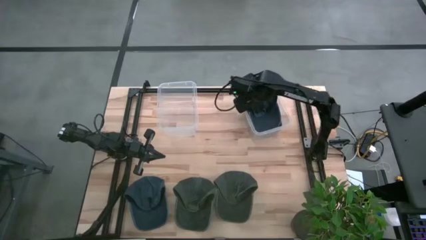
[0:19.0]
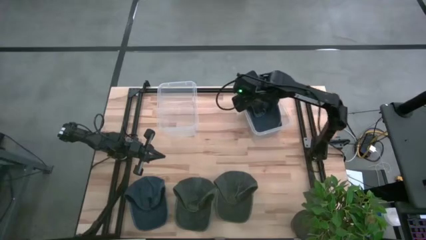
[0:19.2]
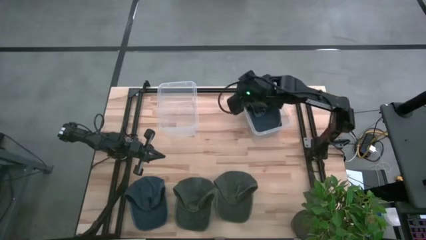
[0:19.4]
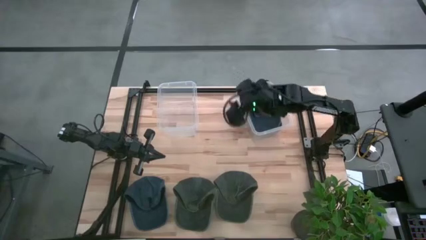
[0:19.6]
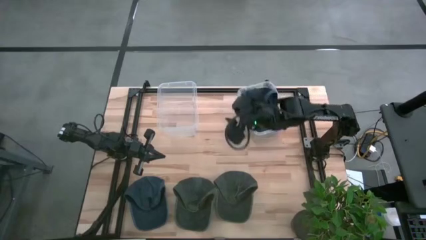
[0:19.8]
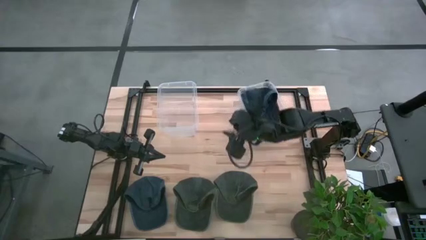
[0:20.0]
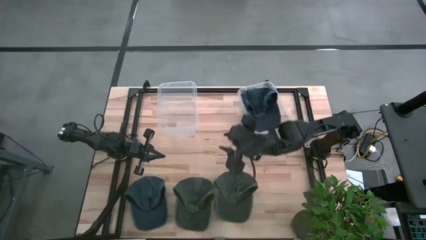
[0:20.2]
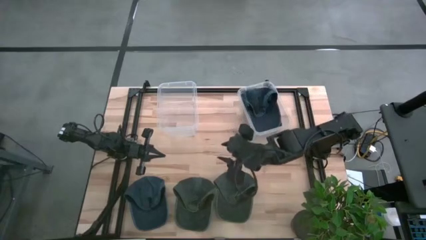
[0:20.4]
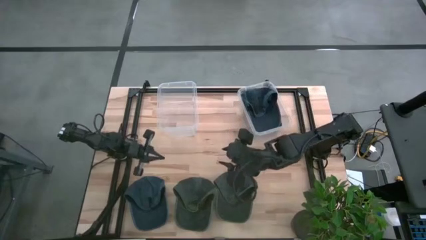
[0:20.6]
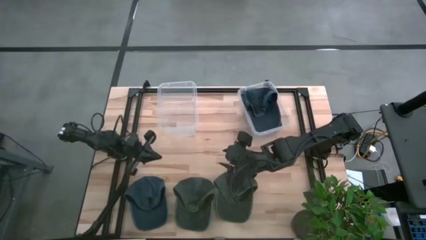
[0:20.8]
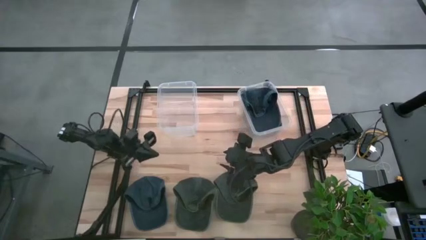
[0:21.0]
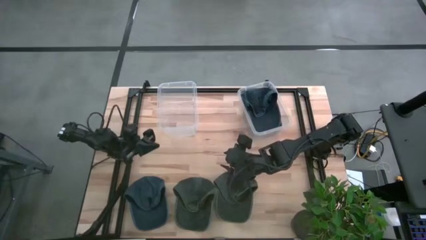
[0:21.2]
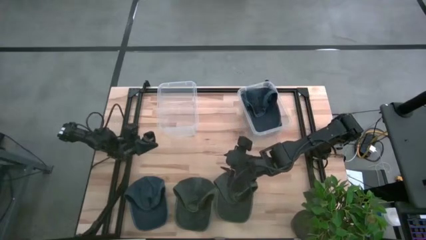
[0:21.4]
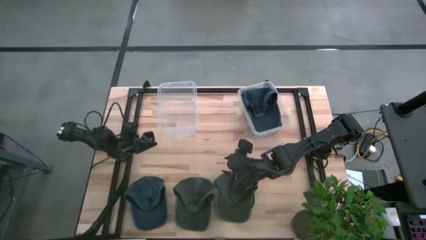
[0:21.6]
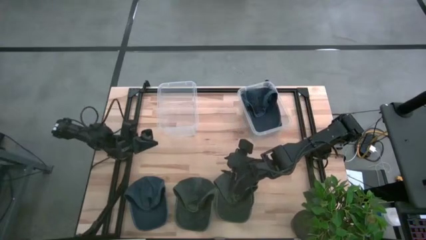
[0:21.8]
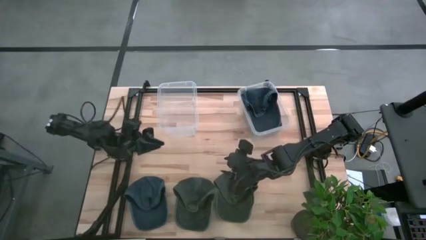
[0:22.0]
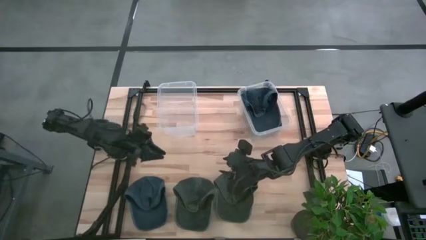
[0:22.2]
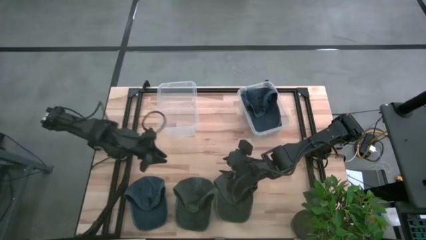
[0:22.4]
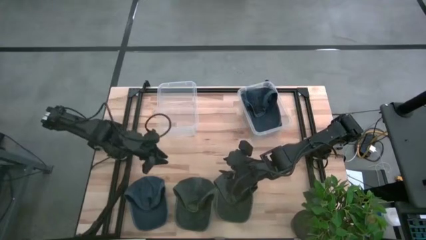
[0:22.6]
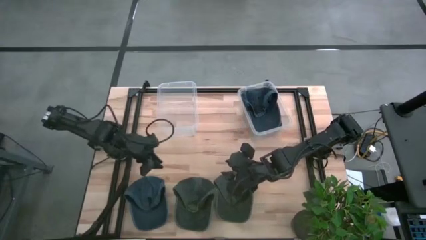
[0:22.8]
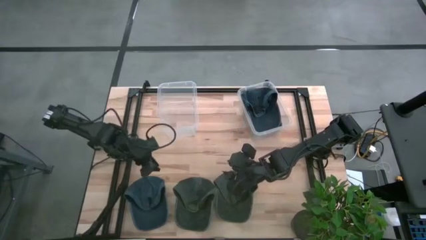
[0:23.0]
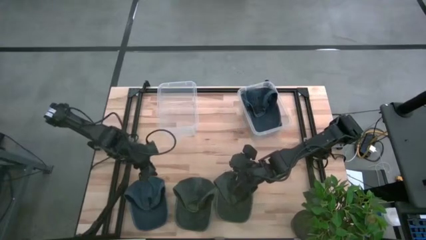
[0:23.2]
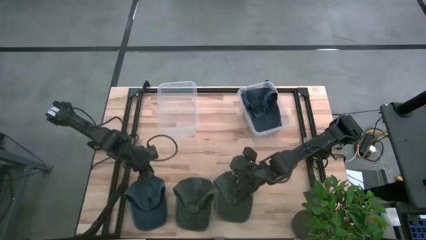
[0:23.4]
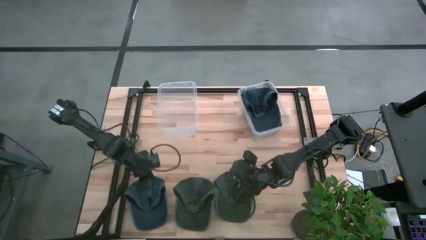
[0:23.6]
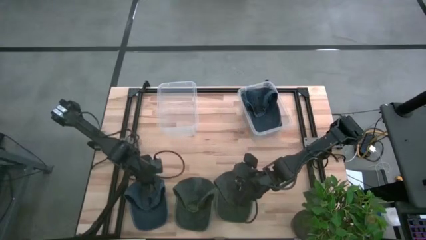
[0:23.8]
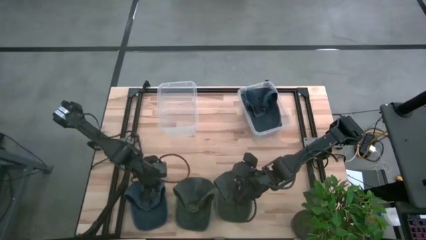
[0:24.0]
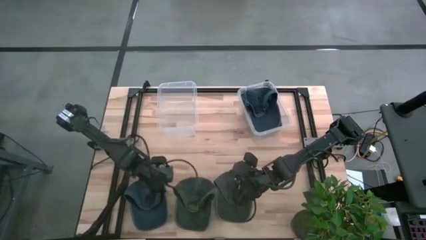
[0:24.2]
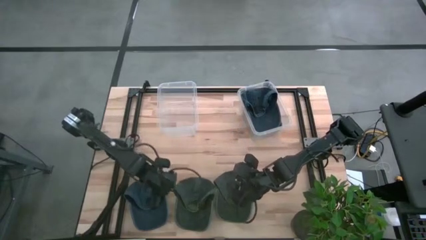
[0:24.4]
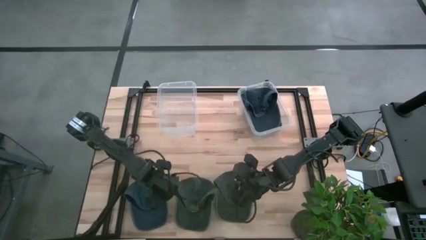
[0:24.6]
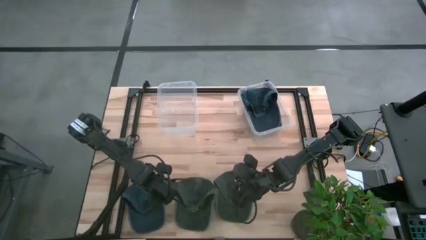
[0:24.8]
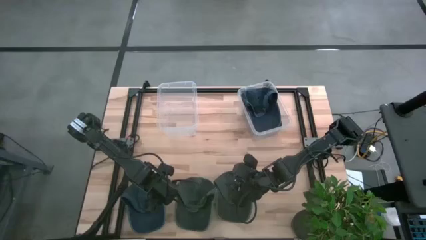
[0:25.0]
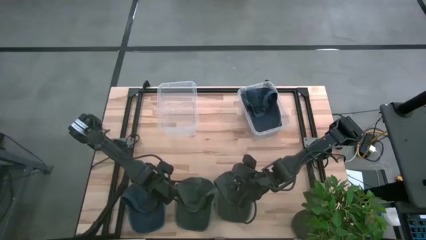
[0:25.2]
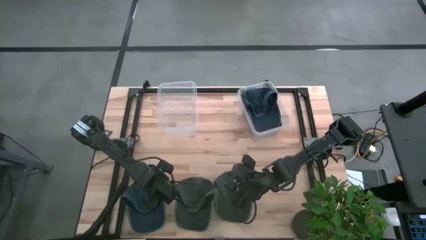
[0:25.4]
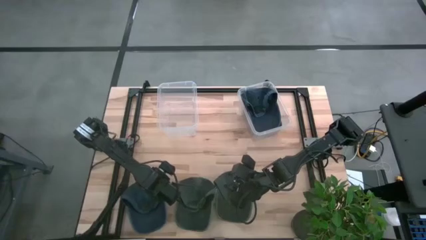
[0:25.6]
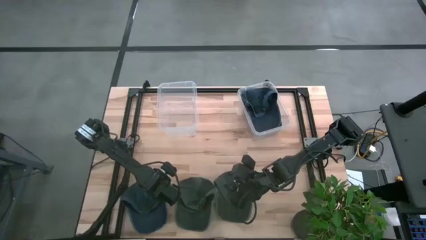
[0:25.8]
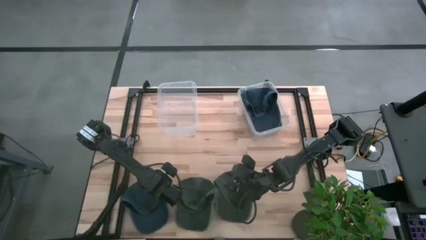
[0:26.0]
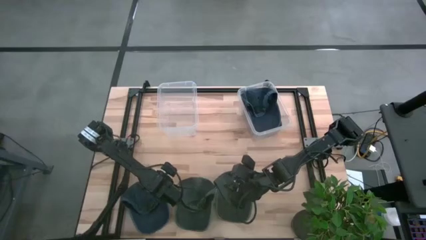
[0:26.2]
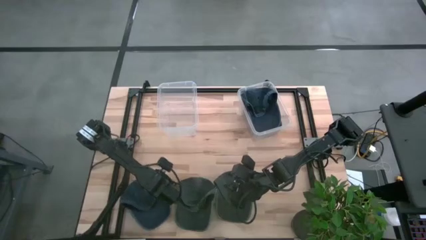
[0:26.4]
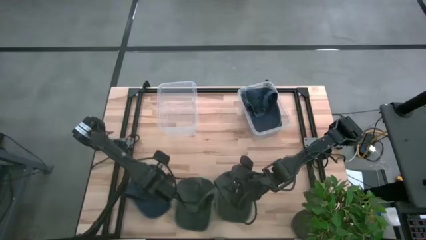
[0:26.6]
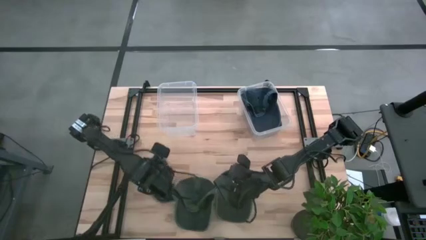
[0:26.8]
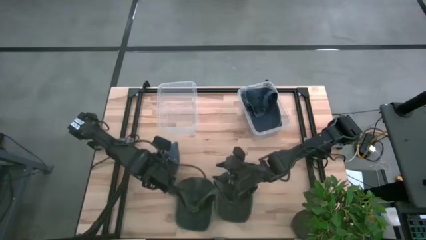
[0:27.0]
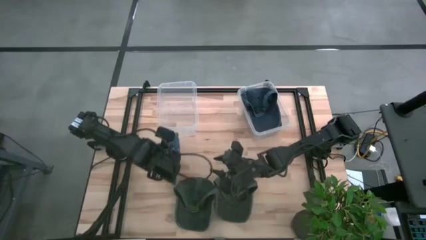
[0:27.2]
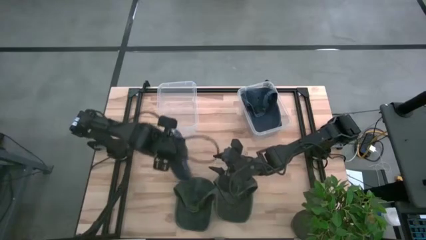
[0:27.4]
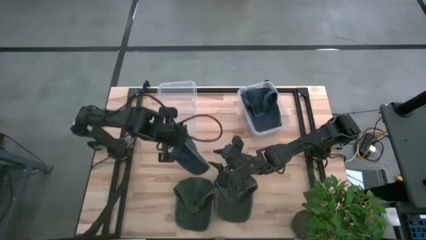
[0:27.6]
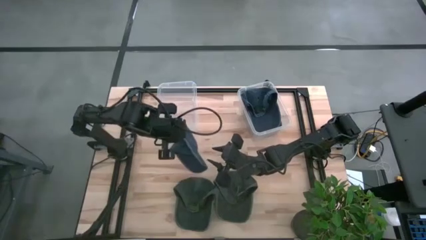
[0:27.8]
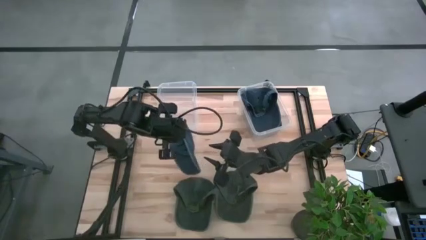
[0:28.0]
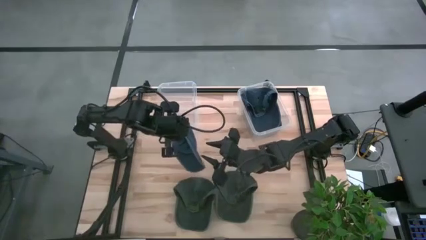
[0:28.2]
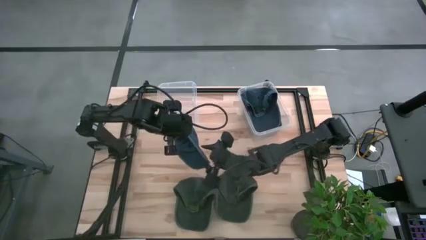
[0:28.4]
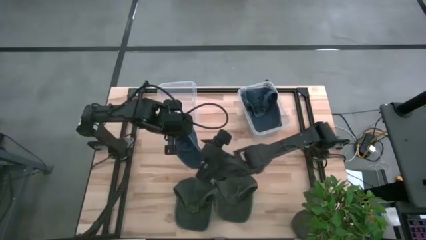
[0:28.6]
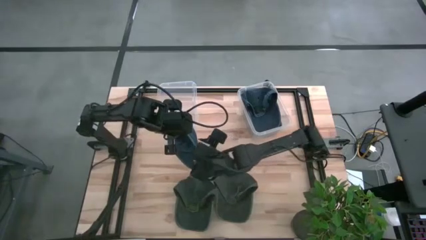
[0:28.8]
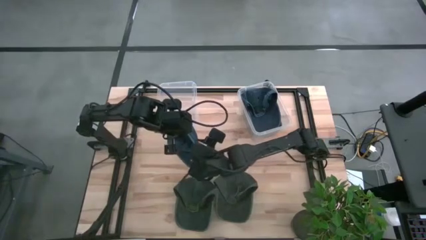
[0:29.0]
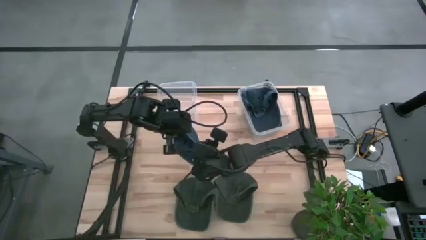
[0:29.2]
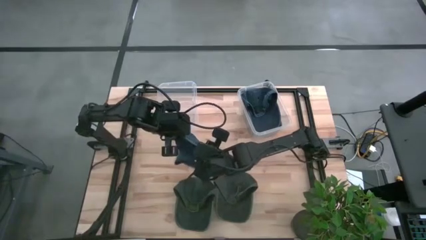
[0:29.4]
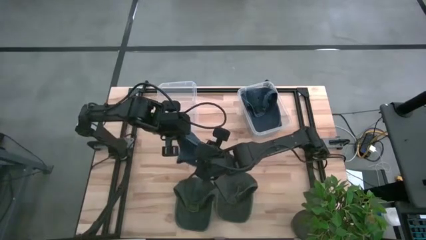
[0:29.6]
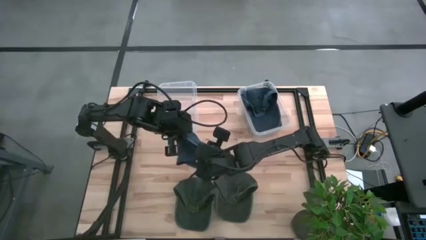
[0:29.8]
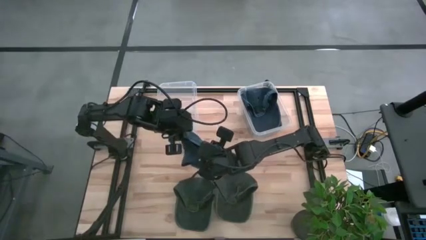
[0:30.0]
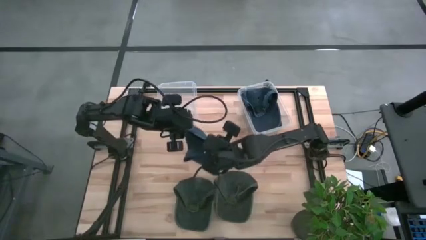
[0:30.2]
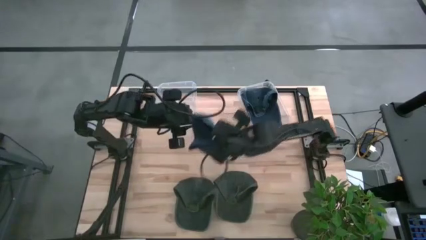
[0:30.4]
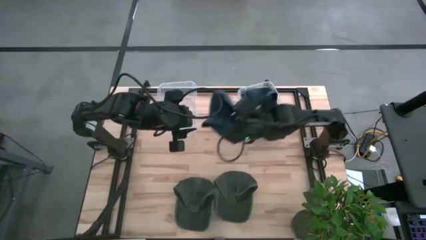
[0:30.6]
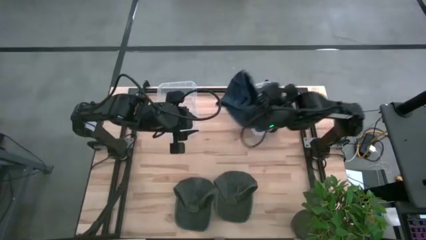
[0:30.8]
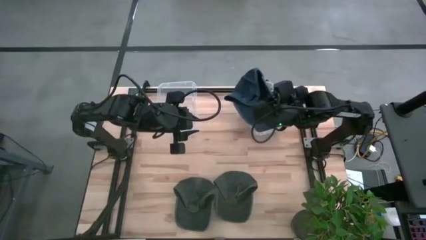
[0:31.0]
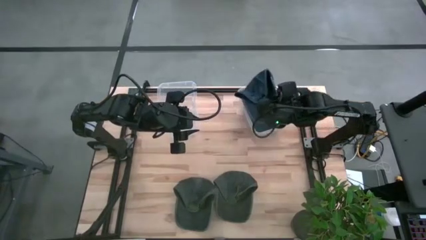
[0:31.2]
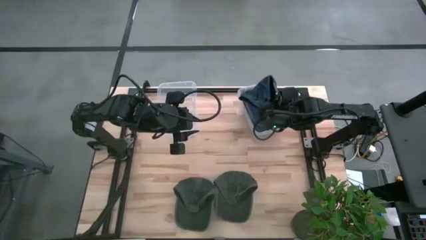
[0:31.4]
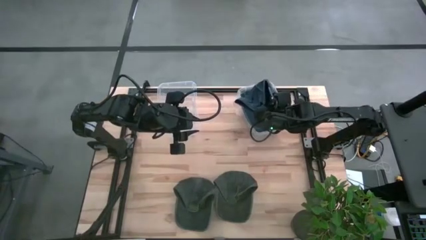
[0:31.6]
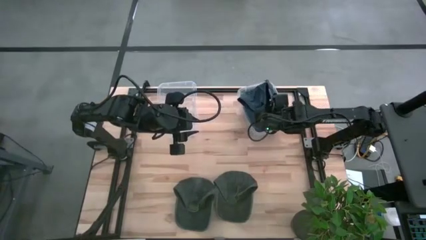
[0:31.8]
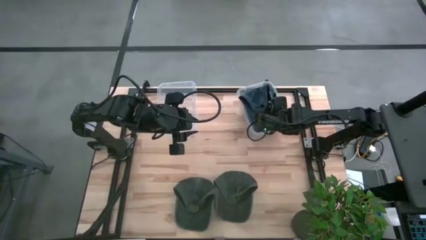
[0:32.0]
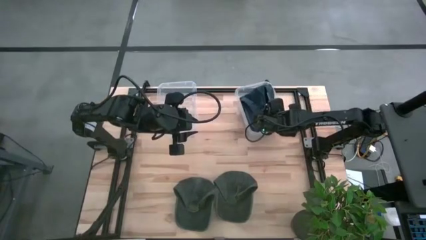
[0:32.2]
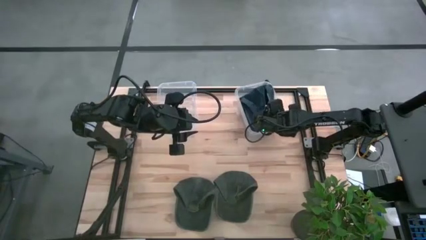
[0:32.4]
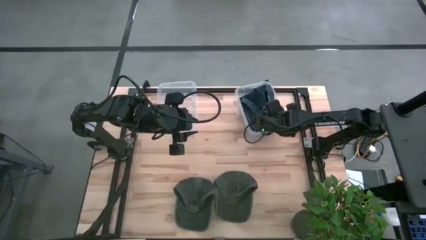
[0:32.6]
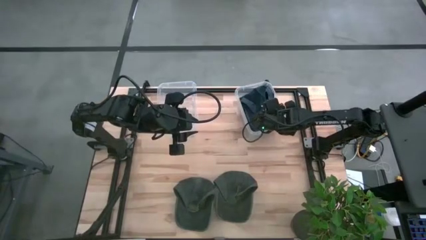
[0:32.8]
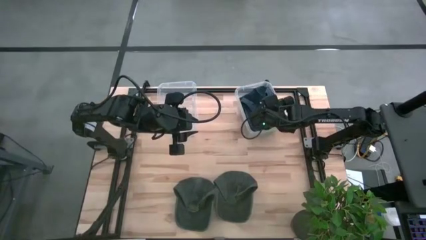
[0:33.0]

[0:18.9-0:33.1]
Task: Pick & Place hat
Put the blue cap into the right transparent bin
